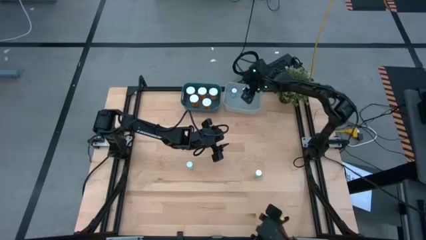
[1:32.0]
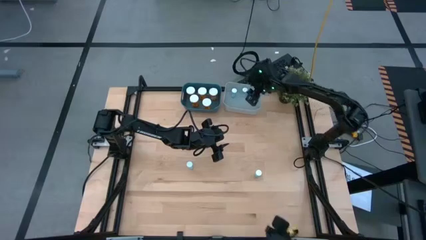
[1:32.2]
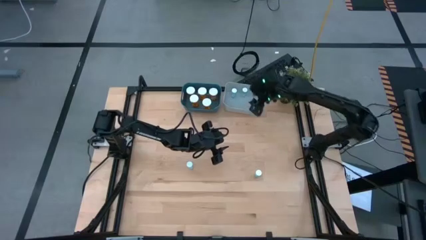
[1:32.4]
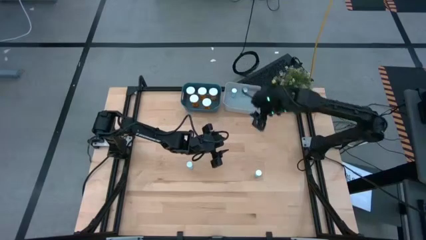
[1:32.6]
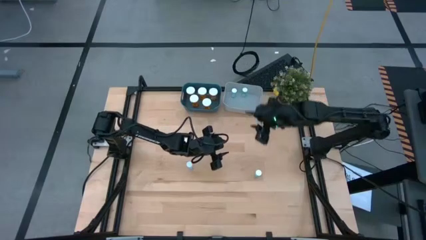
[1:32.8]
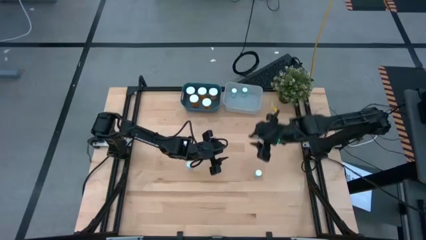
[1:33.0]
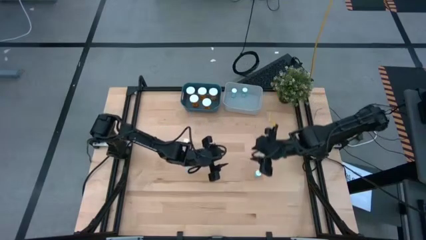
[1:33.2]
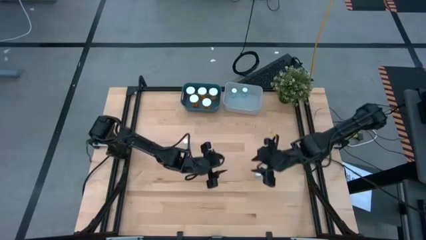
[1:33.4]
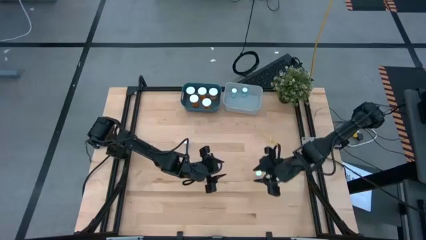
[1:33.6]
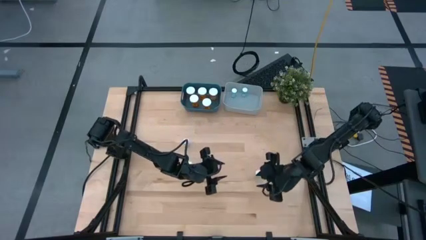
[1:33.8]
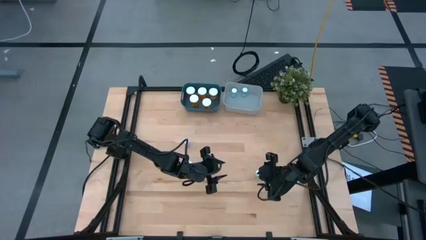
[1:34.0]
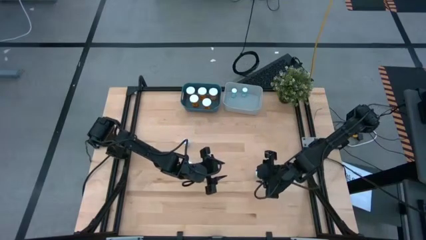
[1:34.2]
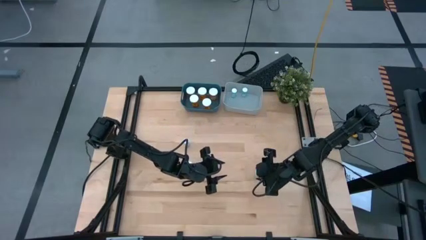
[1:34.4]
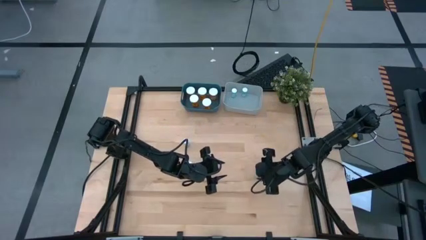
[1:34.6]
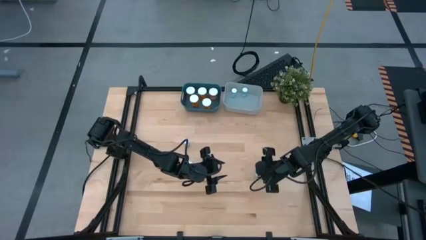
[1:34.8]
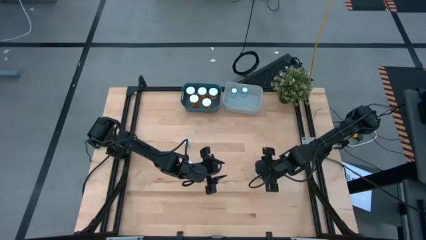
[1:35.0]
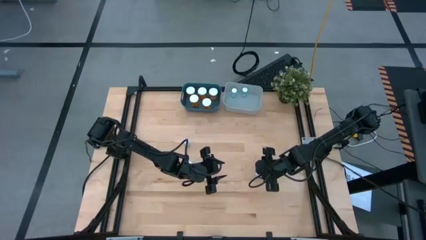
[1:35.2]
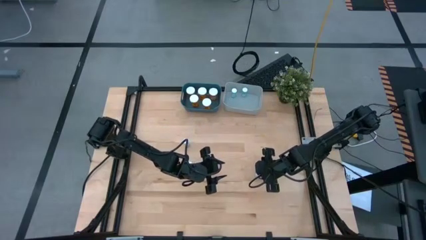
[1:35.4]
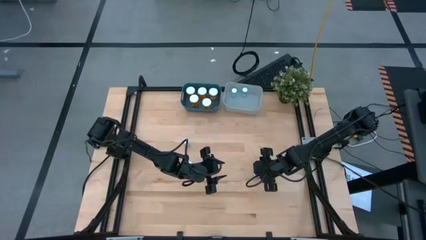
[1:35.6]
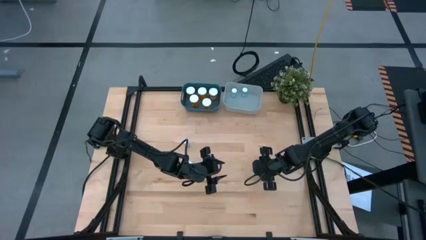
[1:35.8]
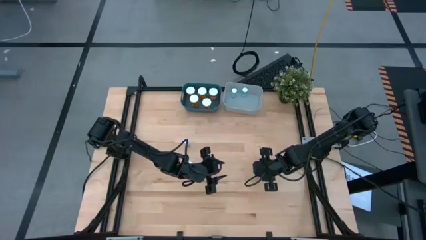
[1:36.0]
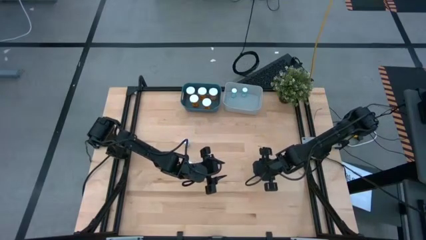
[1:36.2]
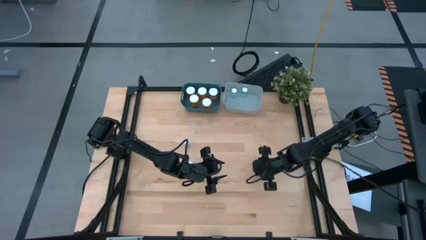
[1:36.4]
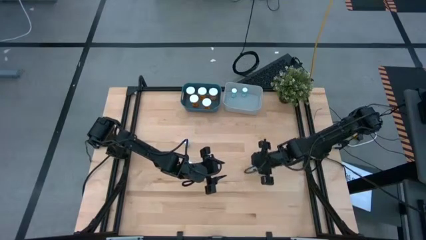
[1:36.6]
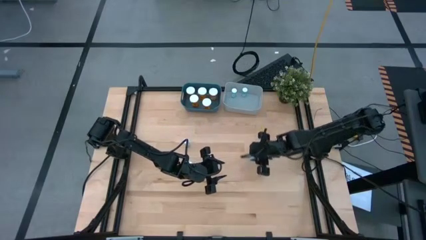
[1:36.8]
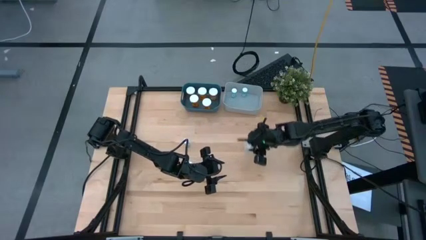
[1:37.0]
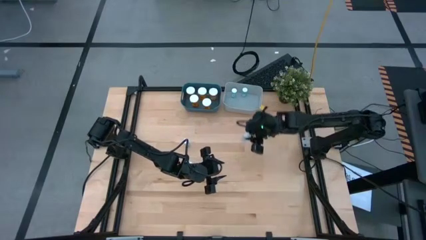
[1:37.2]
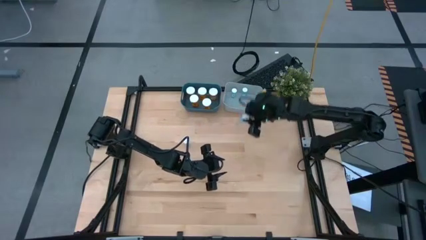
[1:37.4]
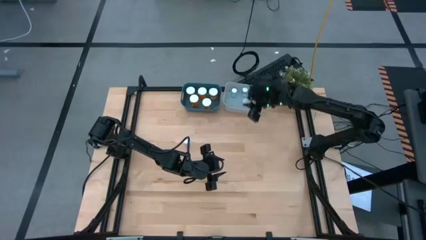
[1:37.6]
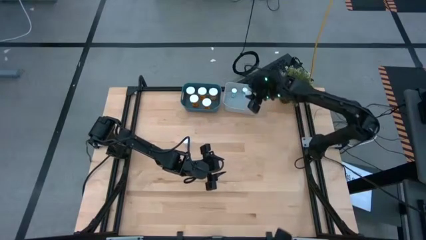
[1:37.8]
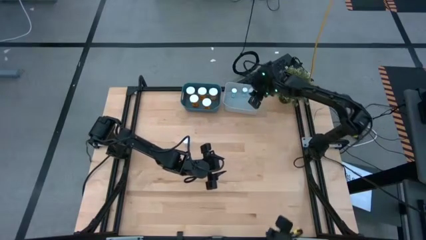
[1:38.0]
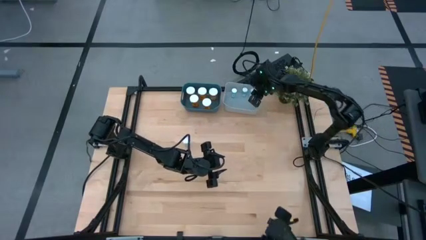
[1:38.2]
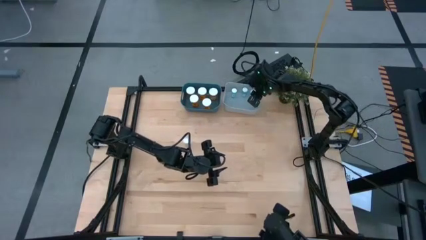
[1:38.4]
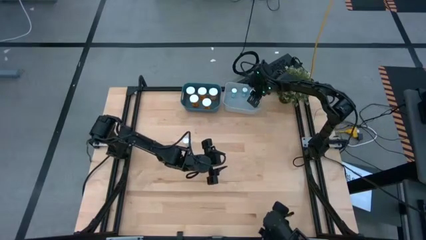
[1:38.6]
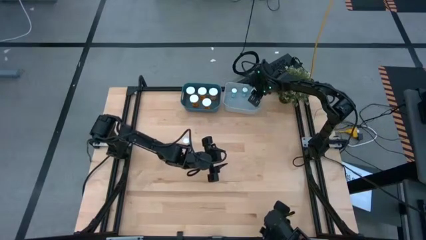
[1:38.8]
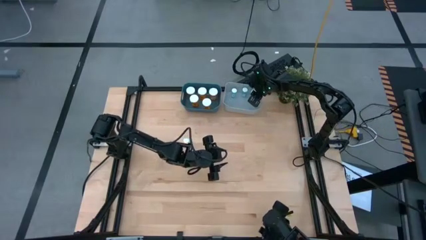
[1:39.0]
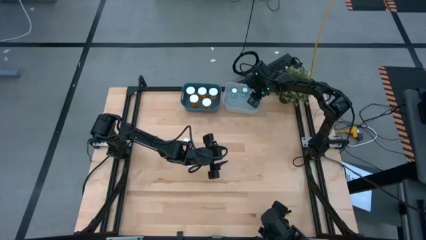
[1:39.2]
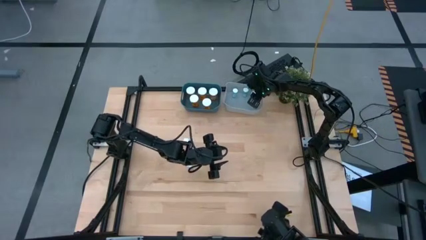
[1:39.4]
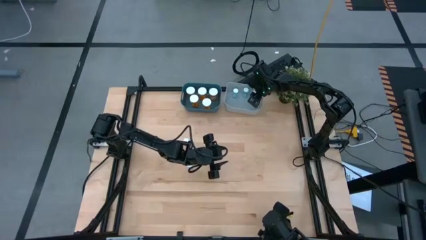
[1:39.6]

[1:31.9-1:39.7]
Task: Pick and place medicine bottles into bin by pill shape (circle, oval)
Put the blue pill bottle into the gray bin

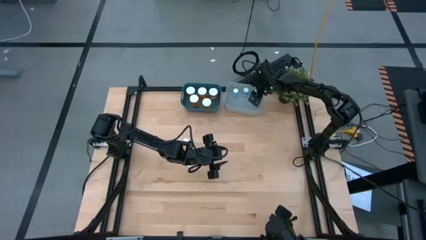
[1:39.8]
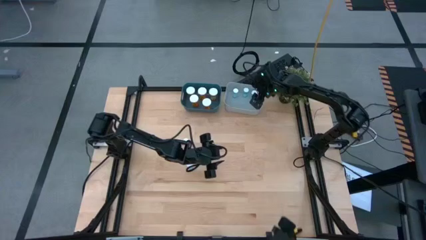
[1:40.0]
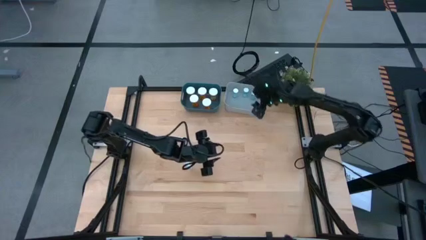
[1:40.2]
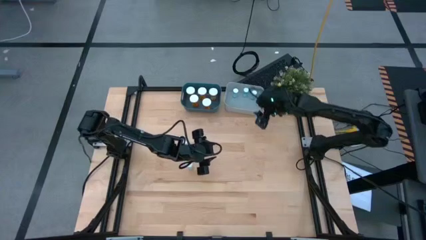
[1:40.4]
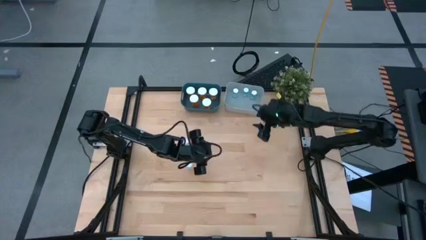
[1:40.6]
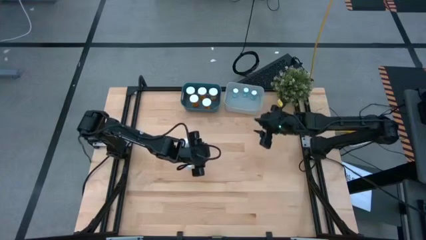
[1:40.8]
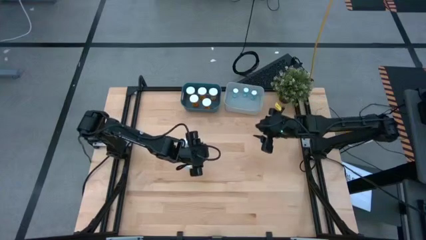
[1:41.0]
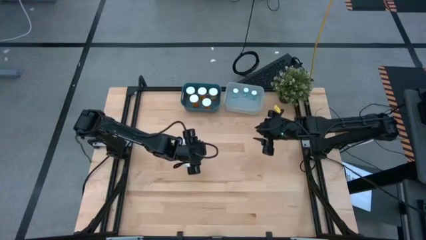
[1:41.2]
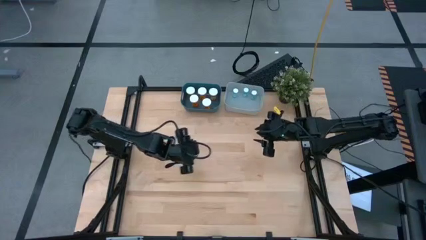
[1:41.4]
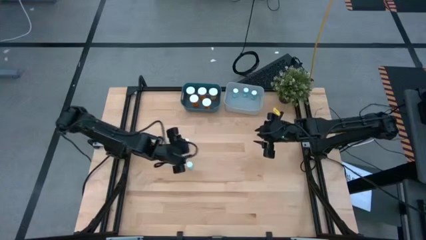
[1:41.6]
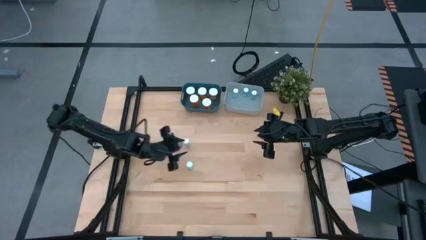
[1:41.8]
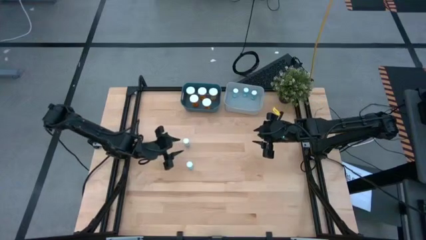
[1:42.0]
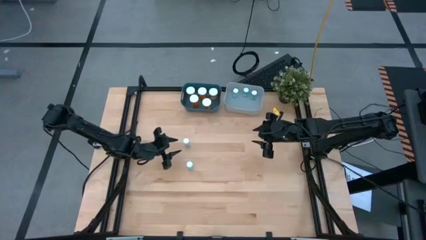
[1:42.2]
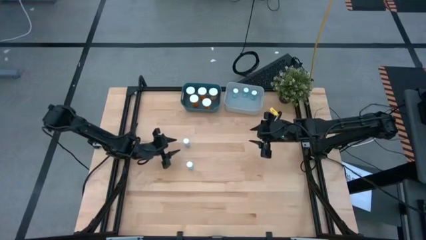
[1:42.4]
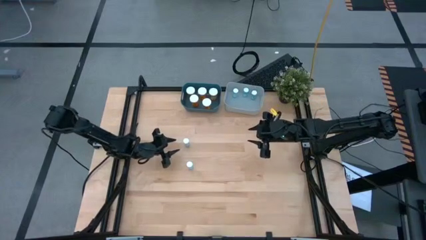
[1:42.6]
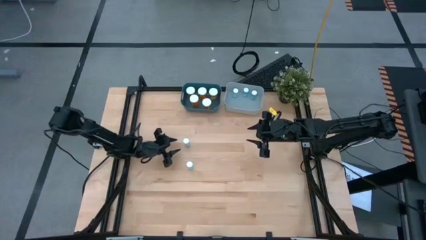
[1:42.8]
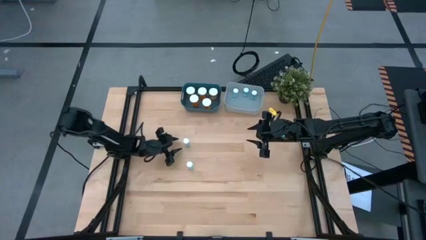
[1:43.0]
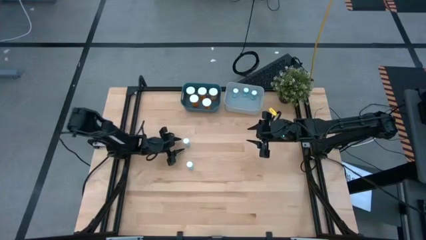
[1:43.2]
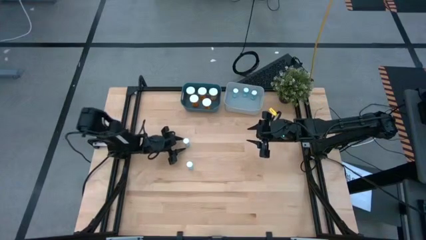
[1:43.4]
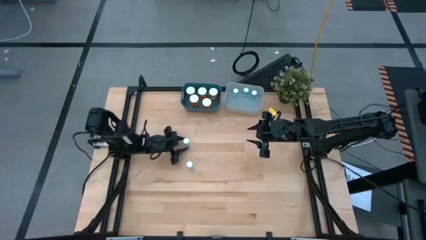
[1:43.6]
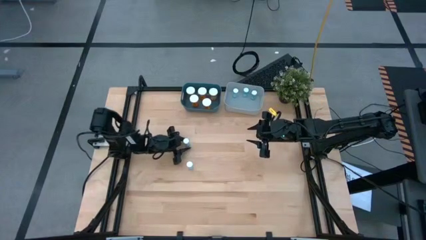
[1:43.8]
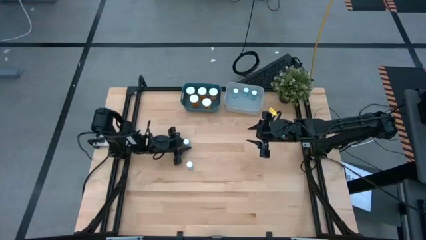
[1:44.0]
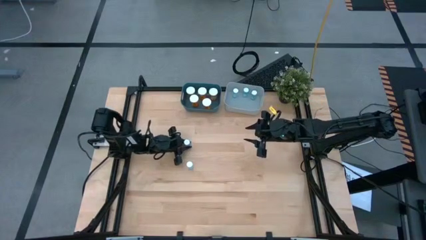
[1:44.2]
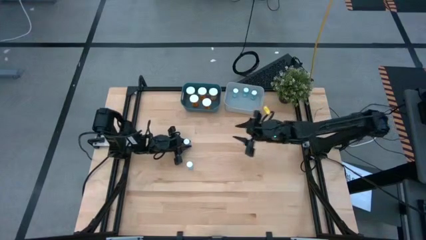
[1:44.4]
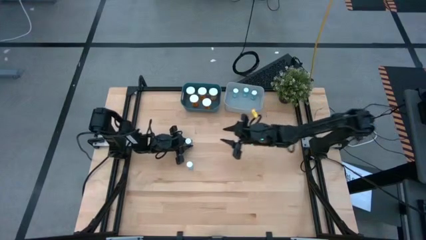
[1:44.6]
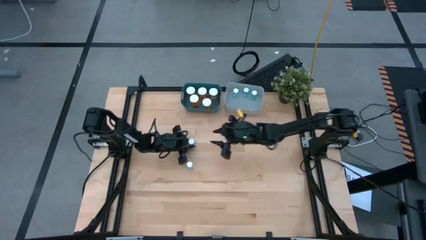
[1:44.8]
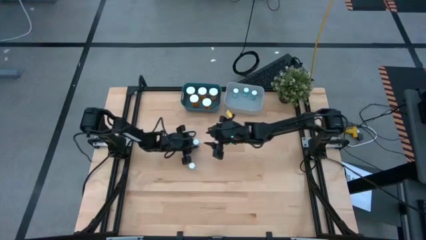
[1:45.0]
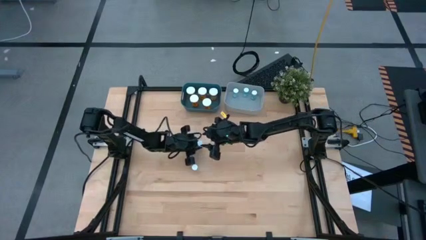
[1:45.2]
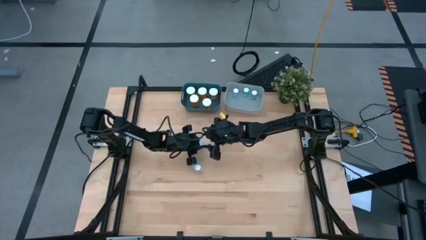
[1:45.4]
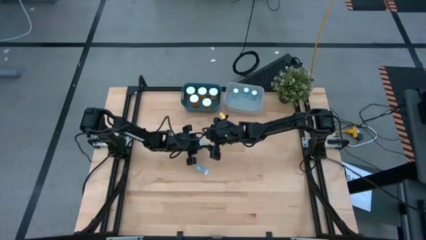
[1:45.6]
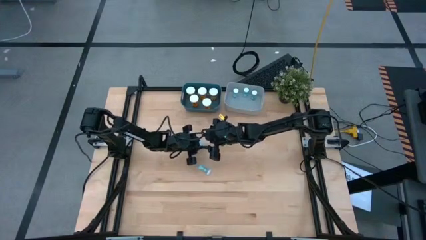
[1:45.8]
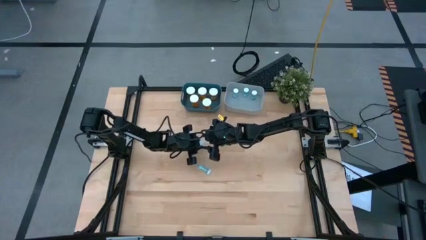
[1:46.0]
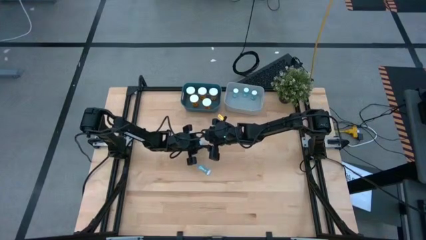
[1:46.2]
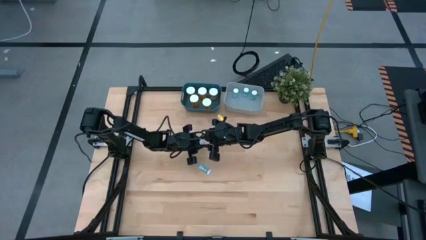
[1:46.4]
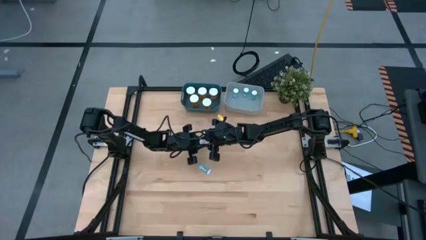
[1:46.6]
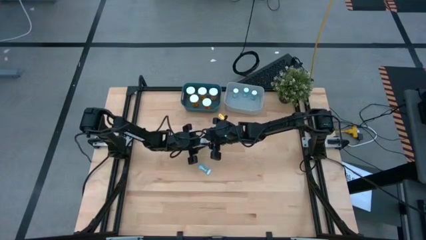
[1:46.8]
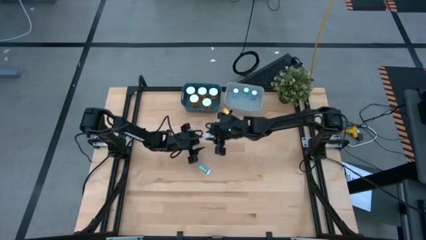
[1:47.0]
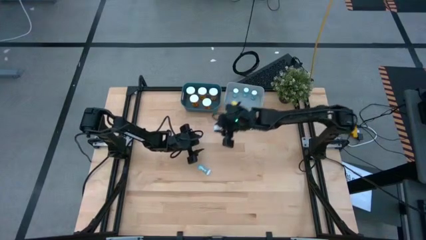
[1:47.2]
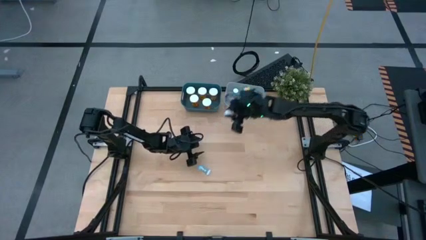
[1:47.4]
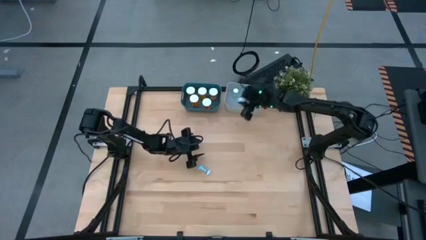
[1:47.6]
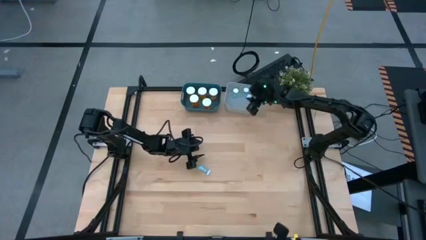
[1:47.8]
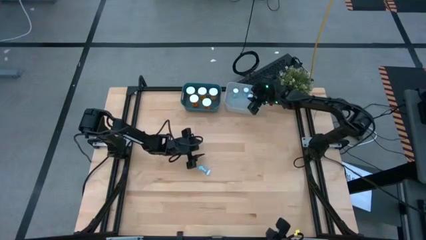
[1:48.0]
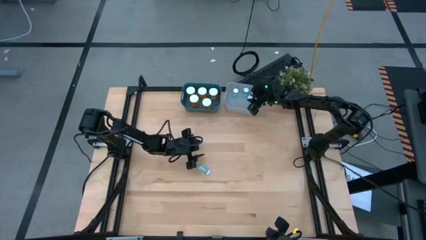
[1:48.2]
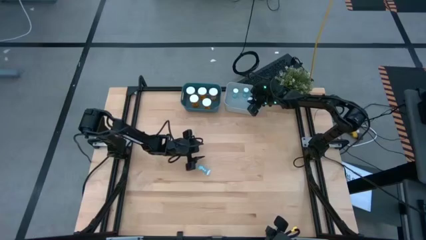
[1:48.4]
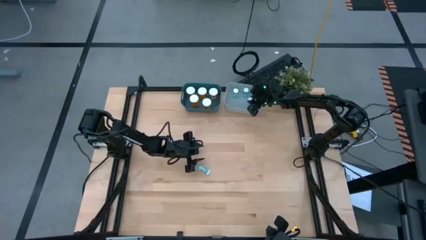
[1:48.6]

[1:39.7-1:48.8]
Put the blue pill bottle into the gray bin
